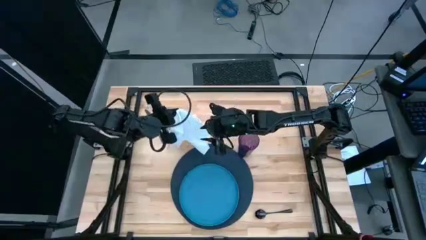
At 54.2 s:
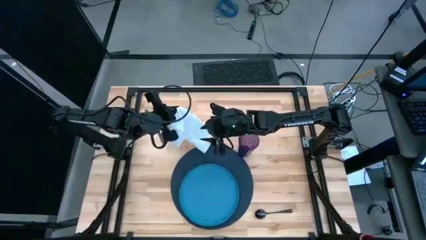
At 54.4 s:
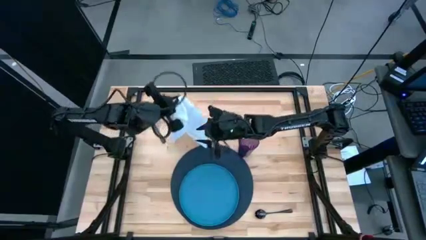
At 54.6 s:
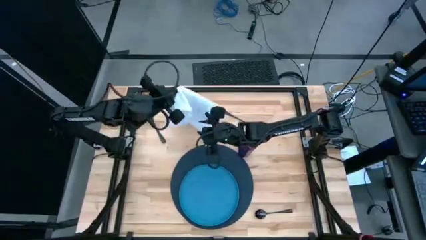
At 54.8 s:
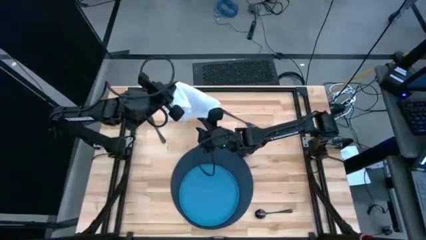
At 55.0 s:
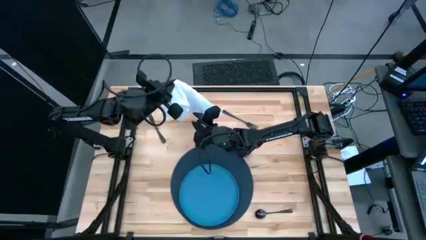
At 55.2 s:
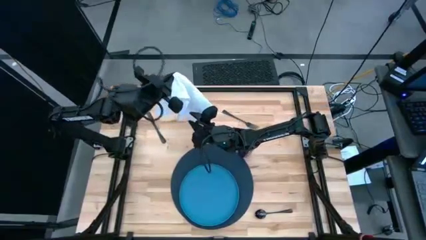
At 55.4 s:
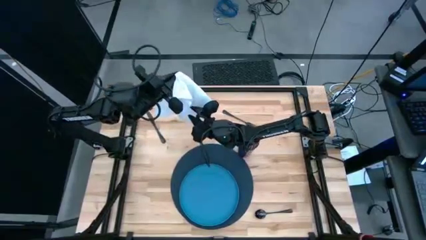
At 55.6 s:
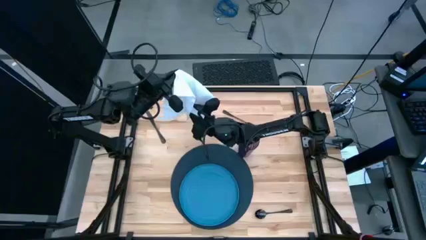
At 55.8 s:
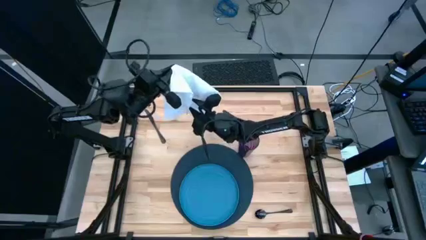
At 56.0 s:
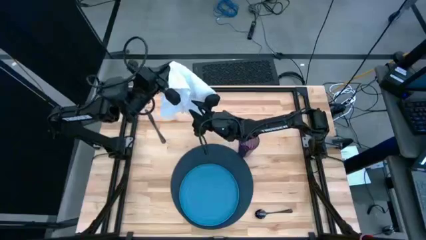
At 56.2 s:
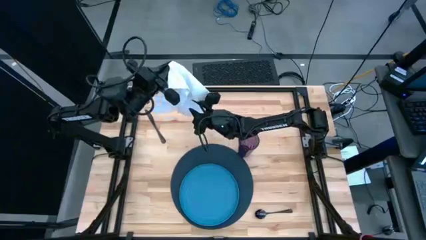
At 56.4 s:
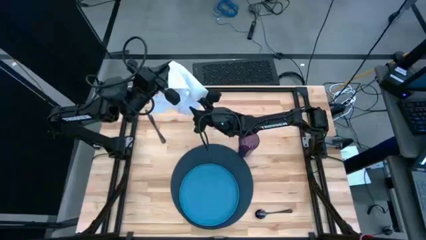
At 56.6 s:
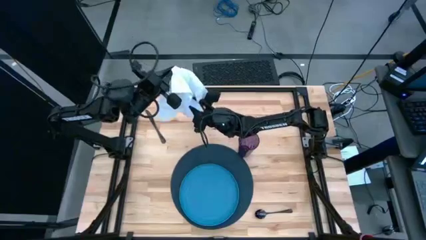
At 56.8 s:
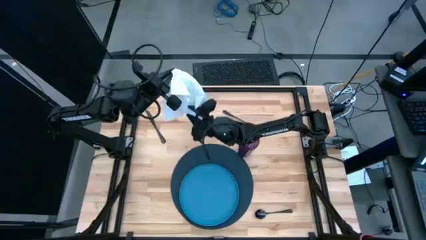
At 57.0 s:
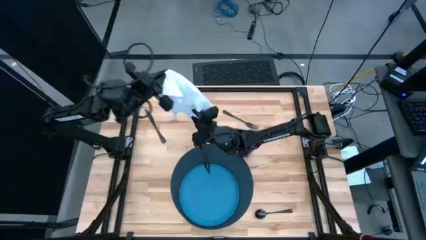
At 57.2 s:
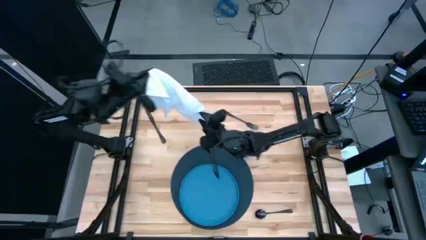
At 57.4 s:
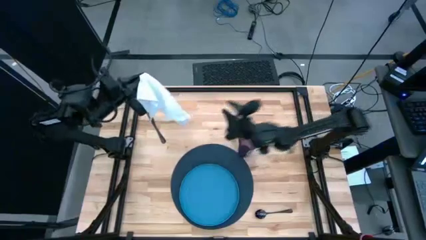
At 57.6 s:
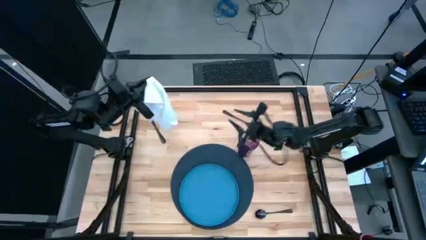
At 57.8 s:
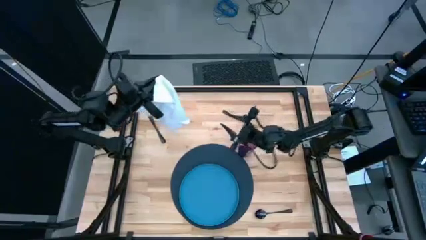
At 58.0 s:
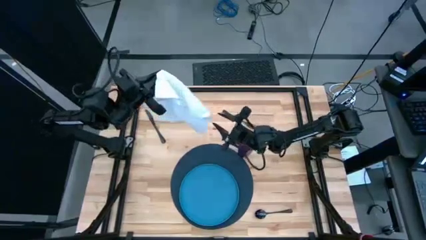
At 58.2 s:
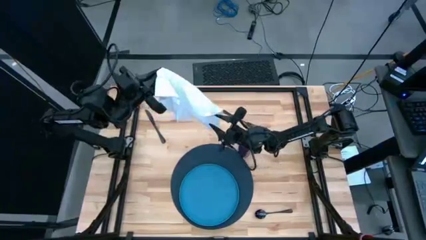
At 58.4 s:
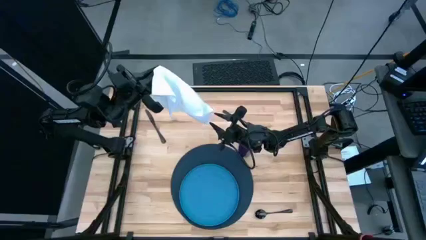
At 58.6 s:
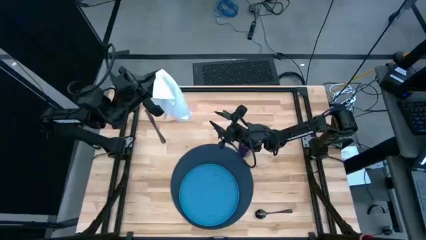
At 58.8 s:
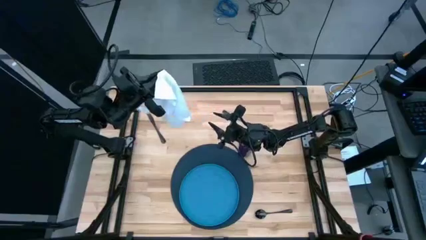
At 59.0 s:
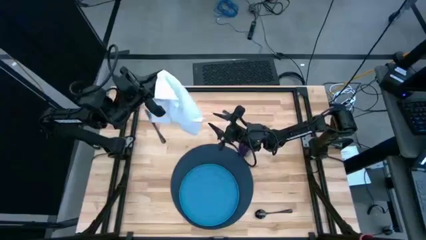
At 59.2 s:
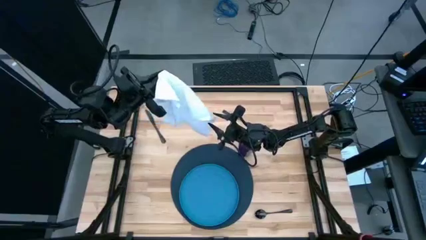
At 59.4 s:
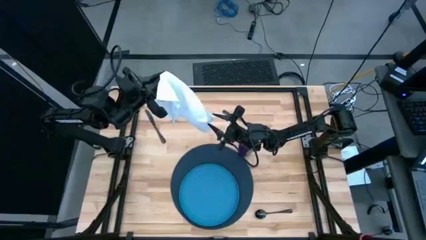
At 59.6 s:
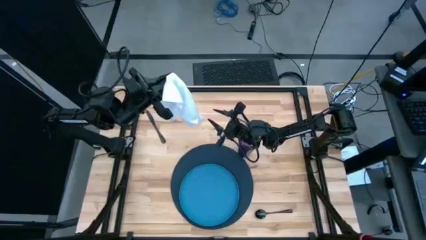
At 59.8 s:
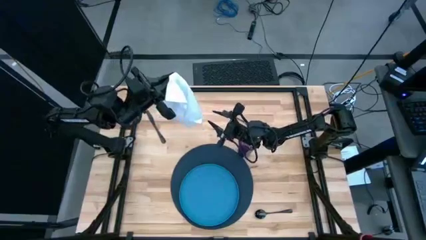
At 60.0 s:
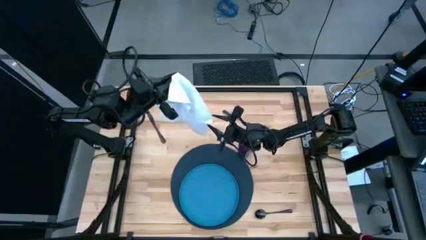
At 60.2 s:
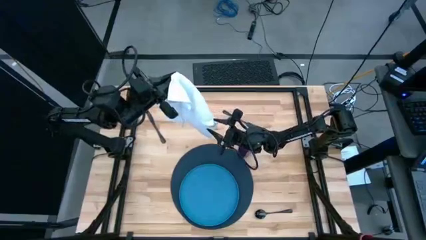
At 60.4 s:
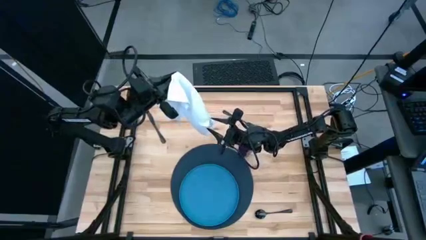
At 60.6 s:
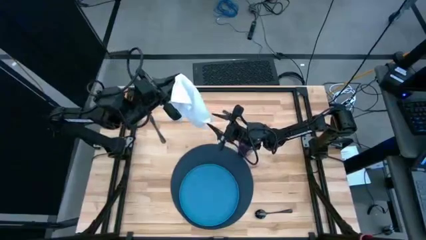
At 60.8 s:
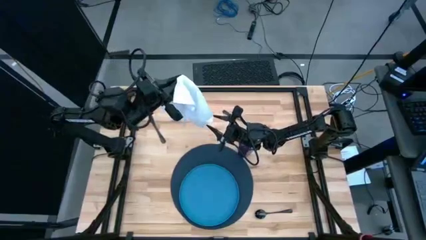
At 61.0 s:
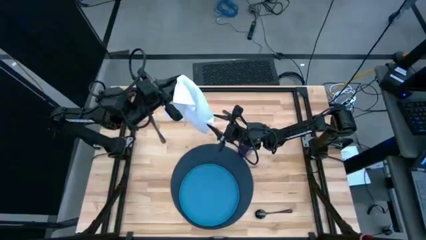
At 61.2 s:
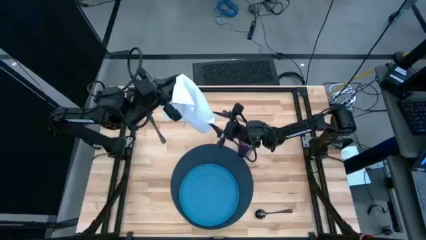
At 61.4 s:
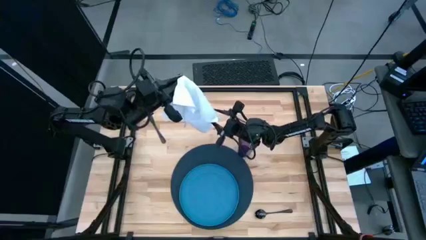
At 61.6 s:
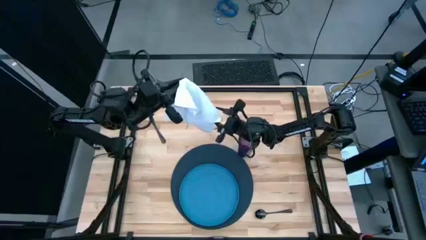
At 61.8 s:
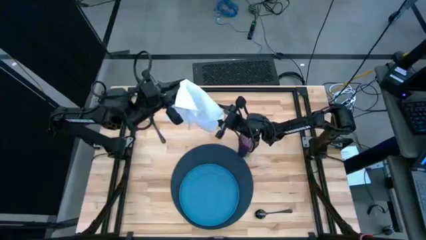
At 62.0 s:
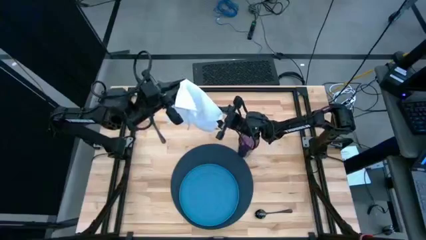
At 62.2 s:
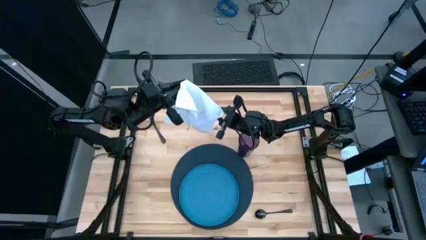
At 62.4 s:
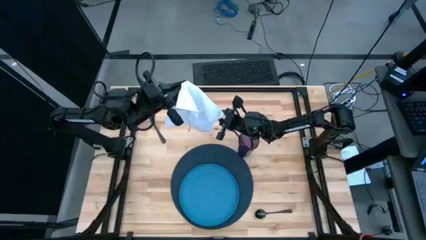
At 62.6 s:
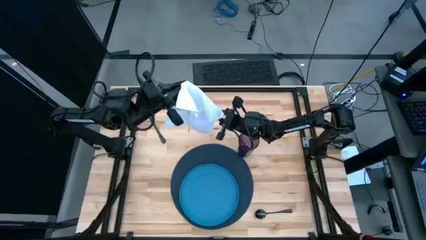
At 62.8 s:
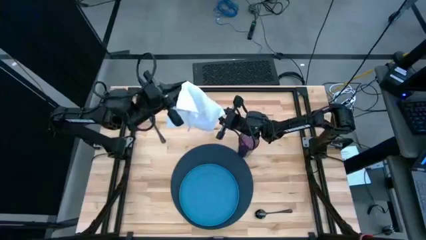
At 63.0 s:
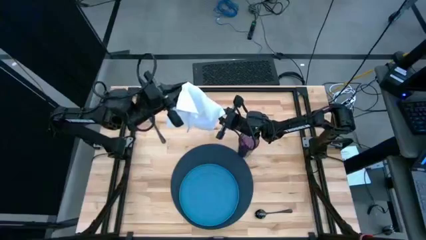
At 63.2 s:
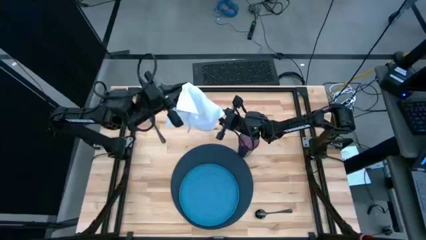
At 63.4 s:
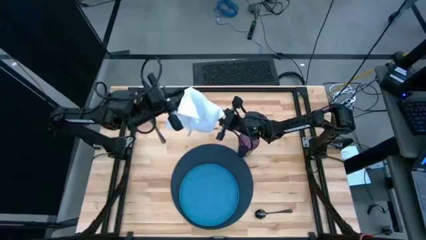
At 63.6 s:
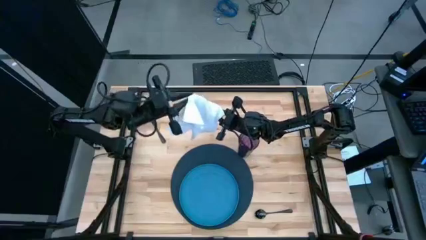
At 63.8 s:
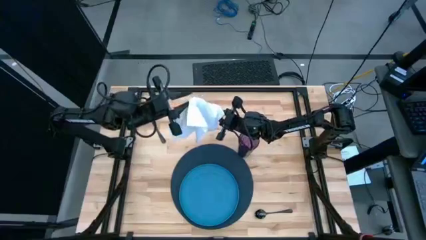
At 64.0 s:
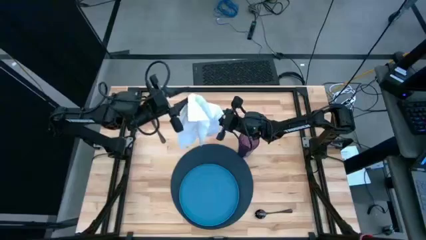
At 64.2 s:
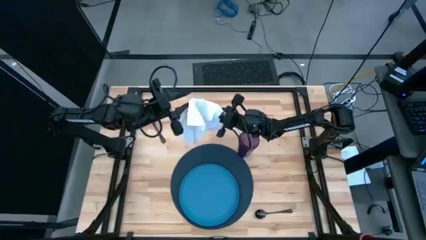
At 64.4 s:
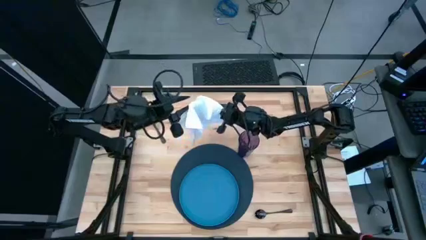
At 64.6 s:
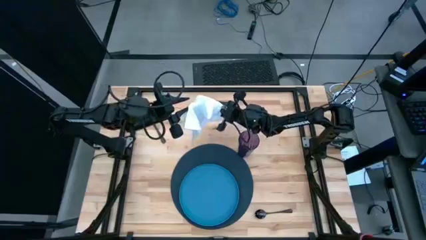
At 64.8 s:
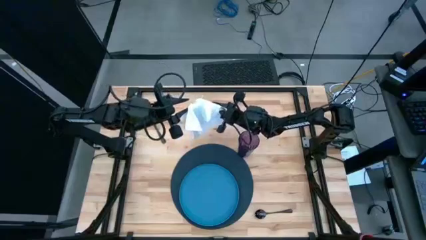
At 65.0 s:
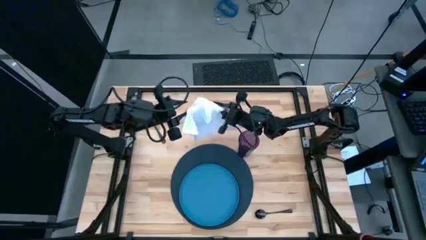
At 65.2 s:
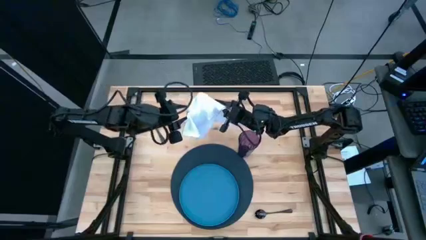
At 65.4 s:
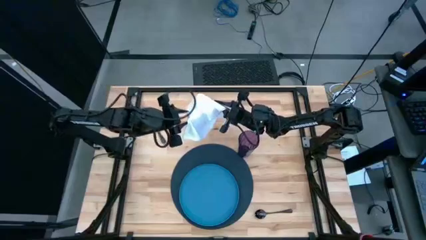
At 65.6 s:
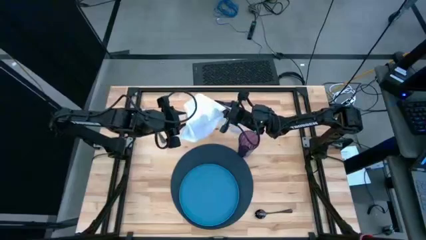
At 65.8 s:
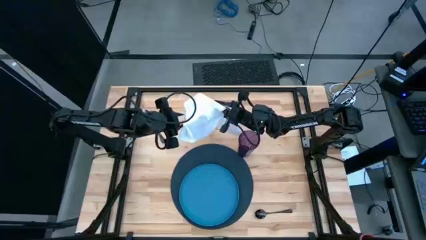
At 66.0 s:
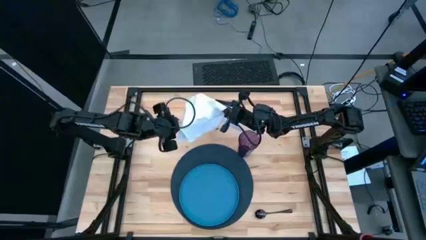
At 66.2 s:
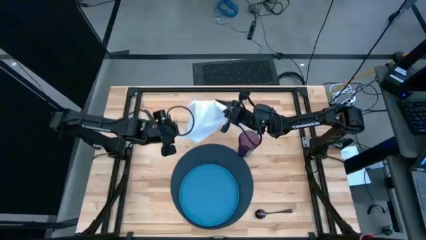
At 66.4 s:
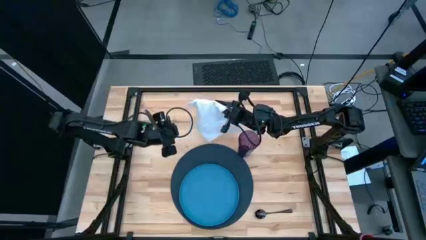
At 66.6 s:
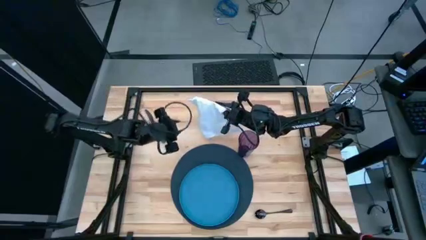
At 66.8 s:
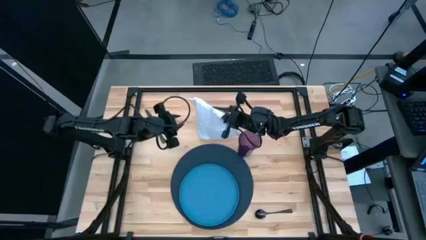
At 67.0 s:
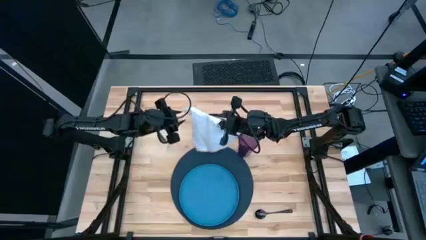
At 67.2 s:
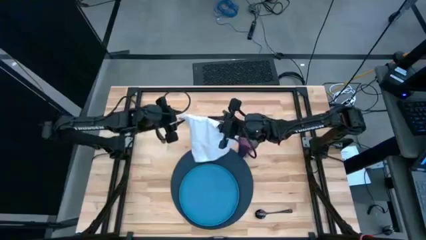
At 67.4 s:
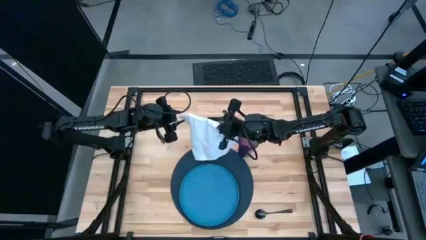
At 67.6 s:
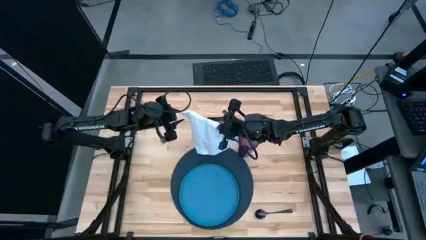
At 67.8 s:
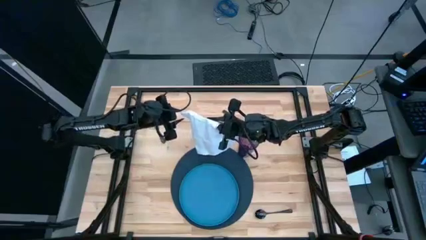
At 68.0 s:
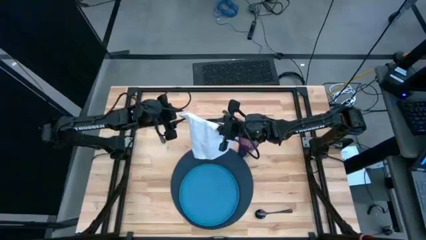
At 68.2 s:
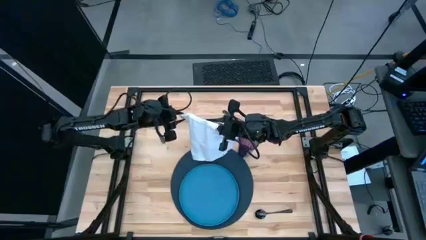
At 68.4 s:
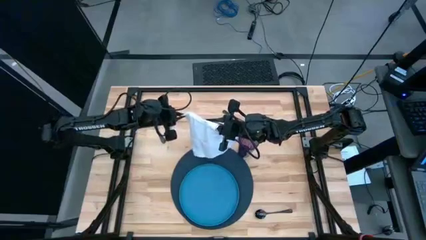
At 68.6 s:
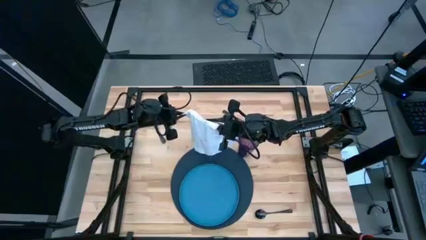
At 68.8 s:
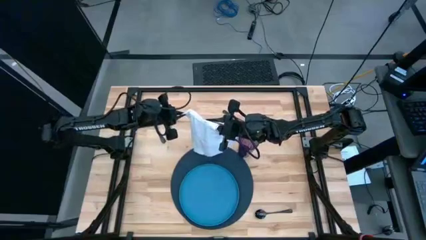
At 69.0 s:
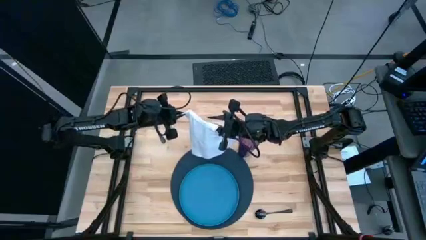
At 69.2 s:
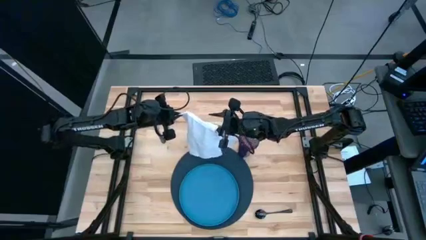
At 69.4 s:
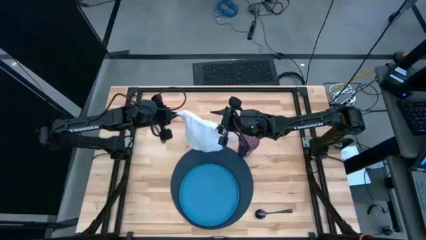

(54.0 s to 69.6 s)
Task: Set table place
Fold the white napkin
